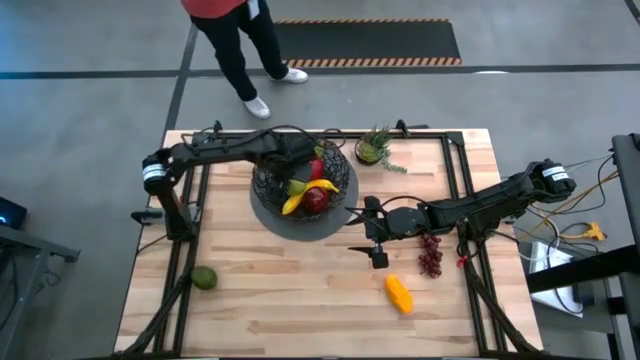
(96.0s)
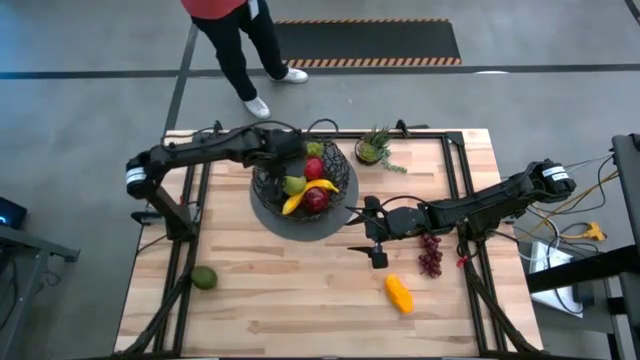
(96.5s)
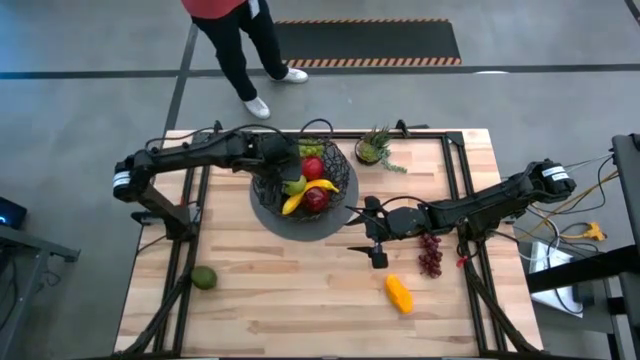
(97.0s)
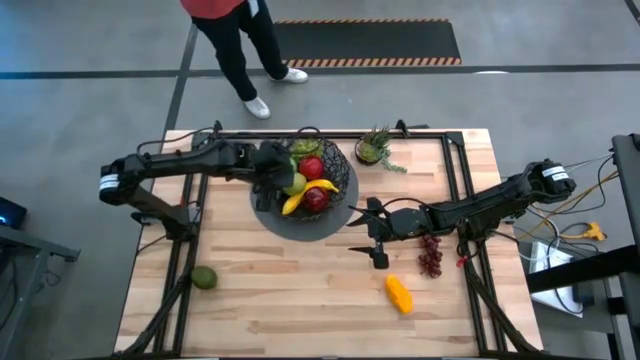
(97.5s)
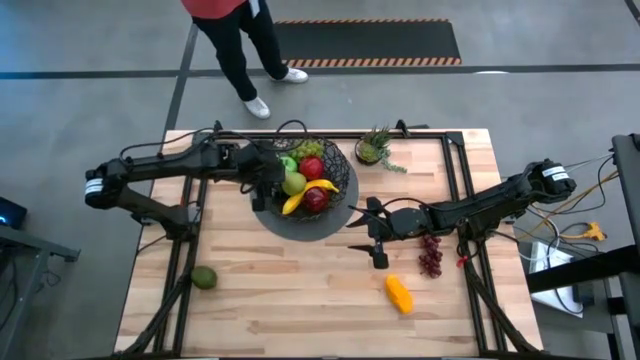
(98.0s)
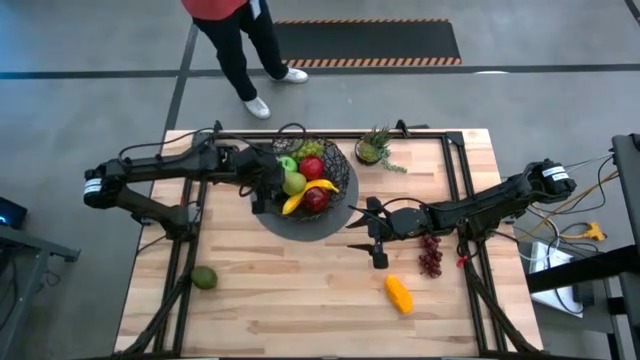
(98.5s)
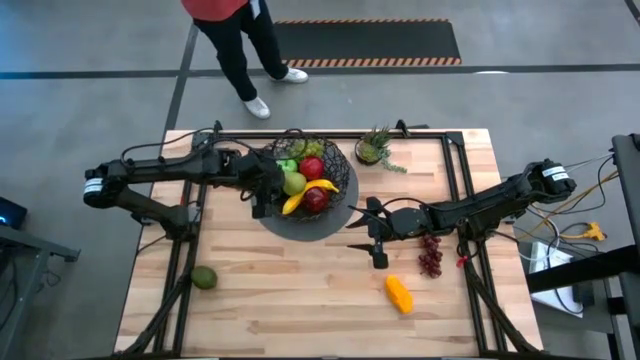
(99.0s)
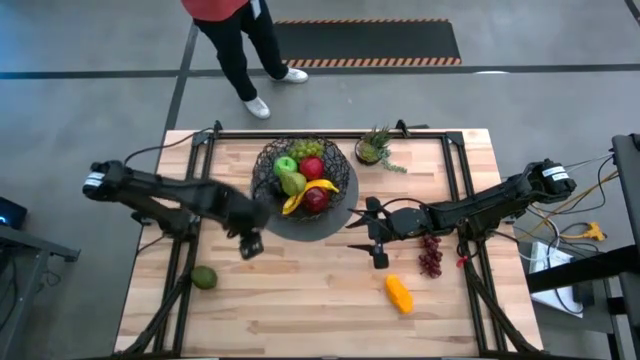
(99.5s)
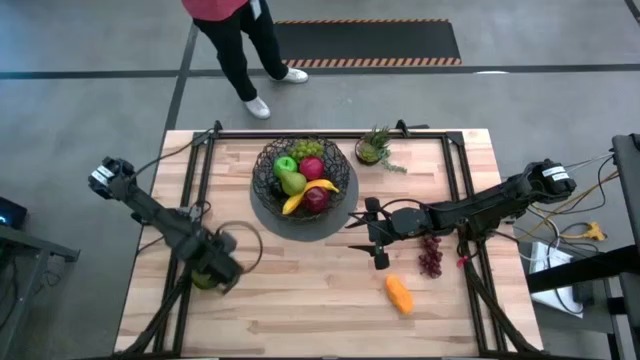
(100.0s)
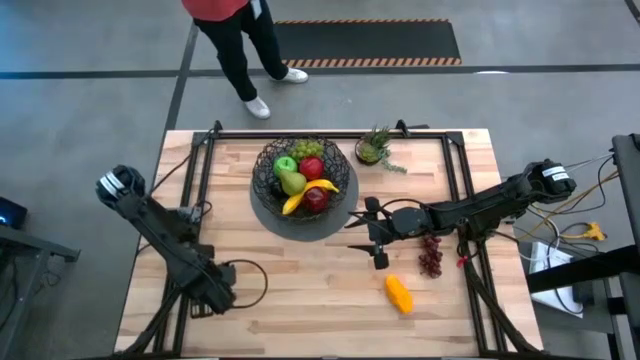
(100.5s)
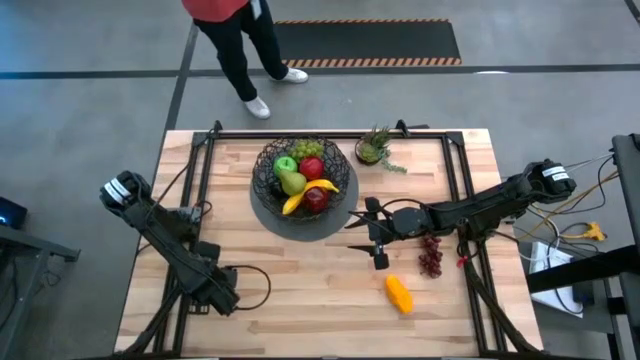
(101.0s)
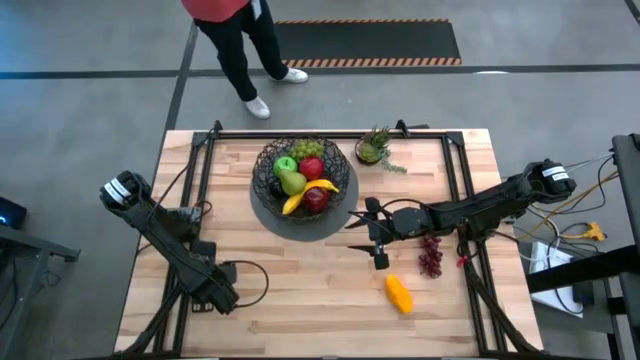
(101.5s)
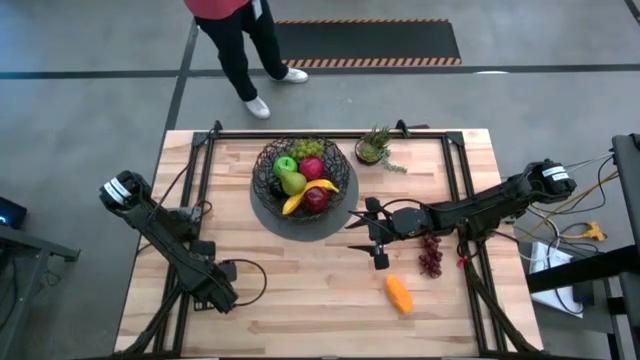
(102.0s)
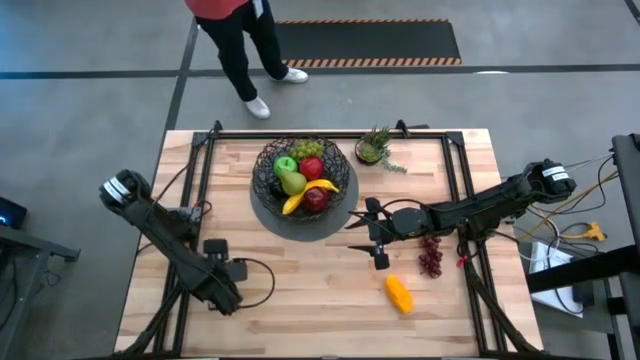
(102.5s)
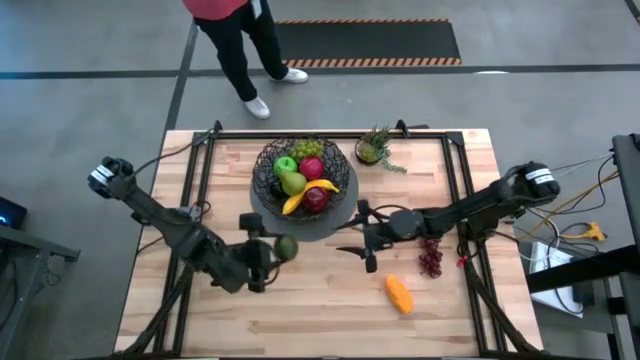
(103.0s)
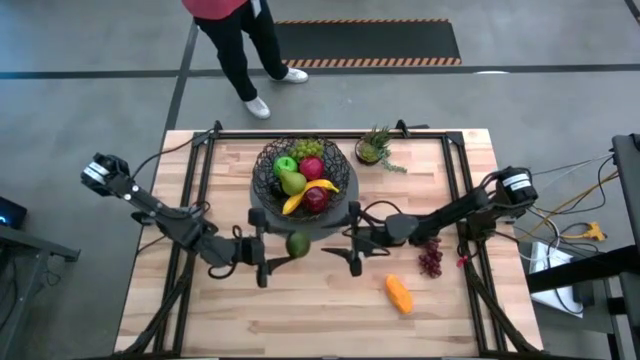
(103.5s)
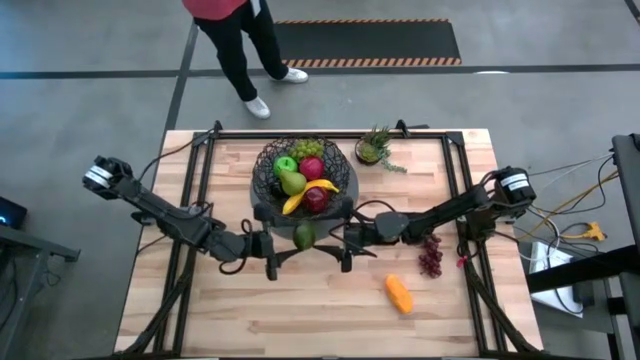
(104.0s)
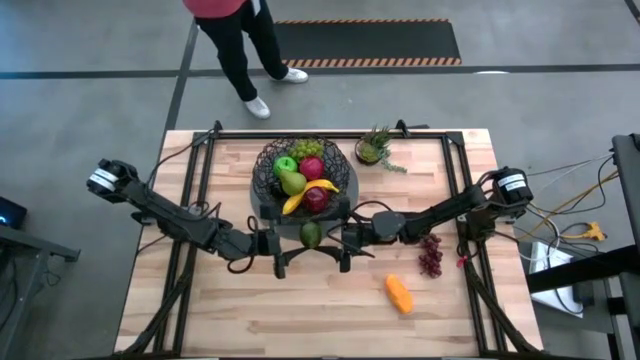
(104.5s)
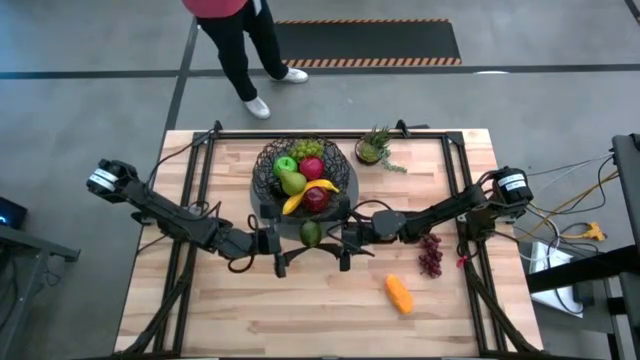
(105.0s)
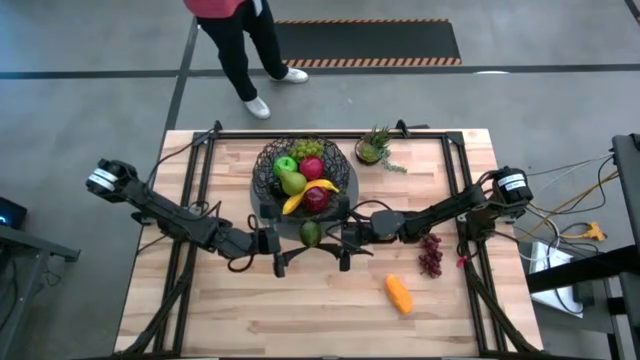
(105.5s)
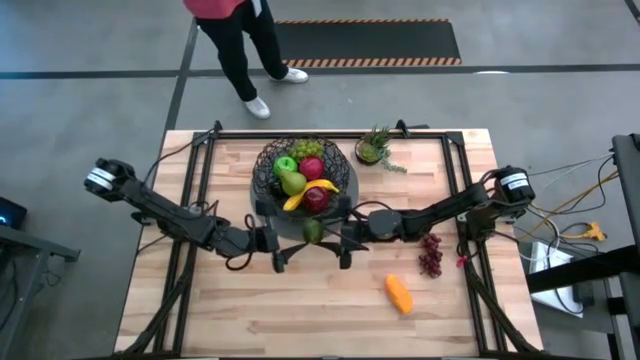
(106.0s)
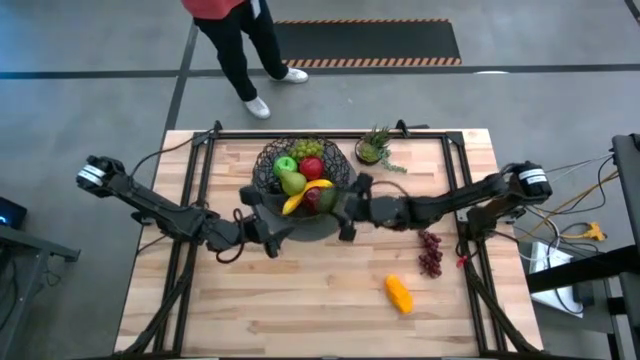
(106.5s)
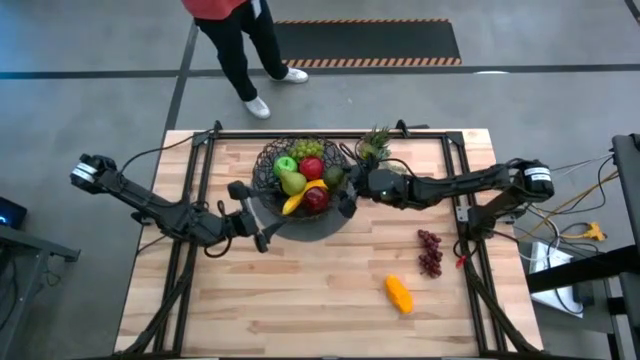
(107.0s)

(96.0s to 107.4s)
Task: Build produce basket
Put the lime into the black wire basket

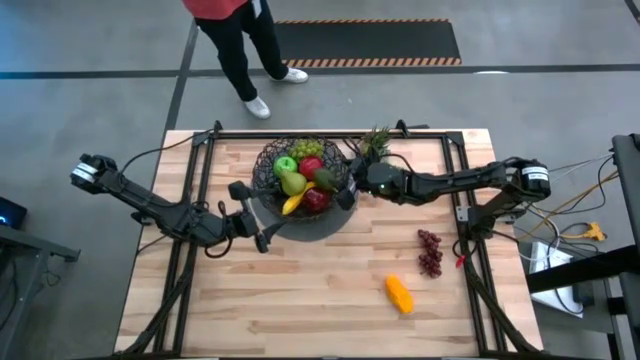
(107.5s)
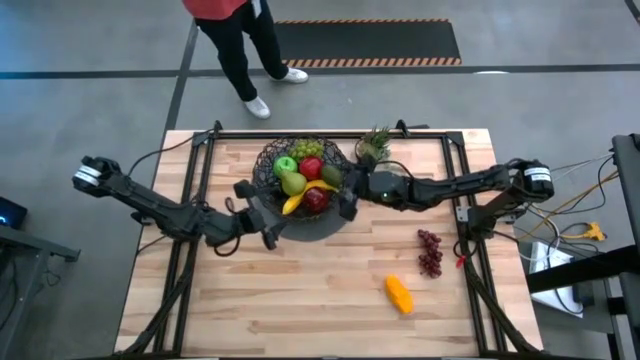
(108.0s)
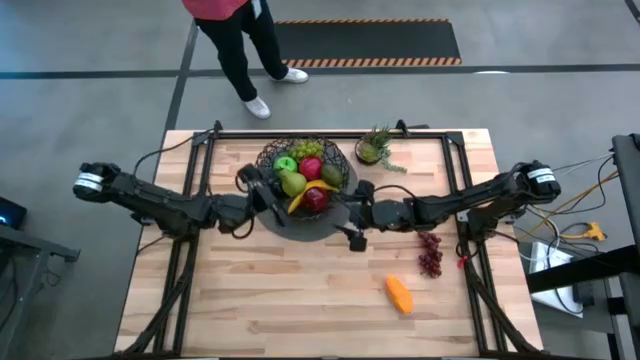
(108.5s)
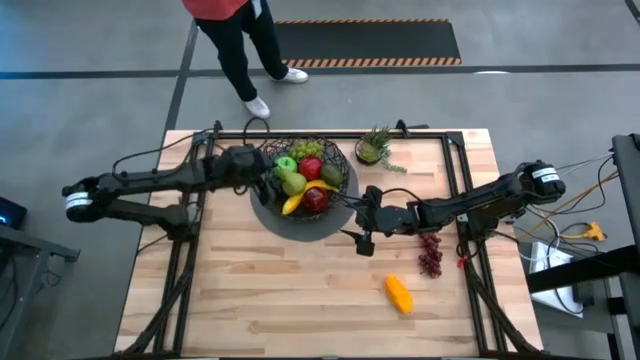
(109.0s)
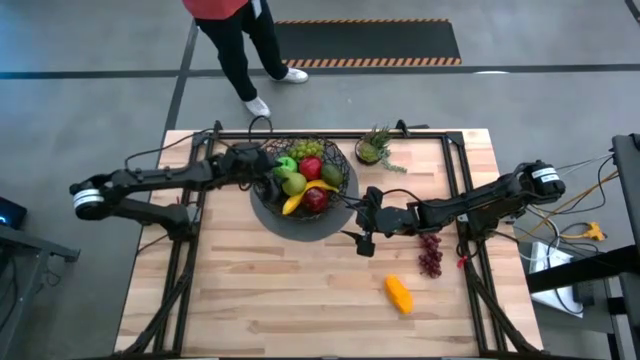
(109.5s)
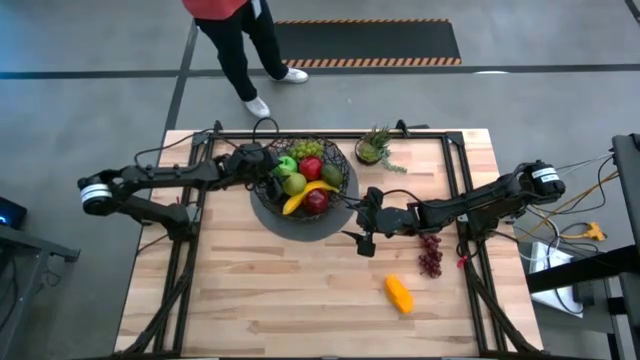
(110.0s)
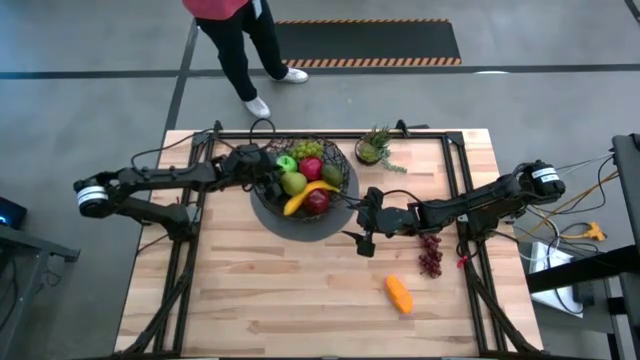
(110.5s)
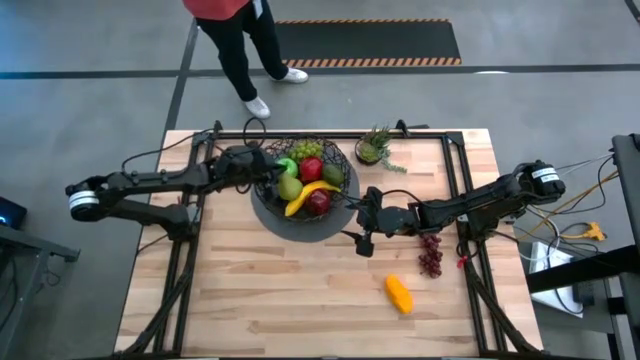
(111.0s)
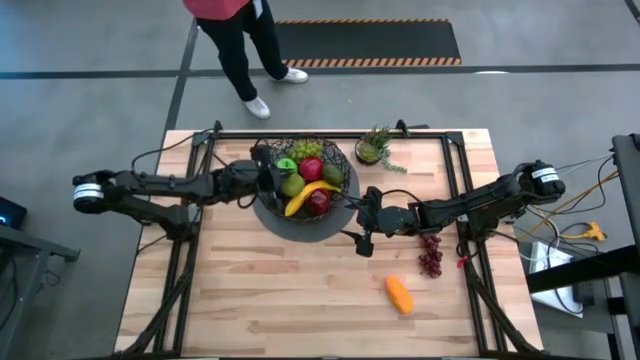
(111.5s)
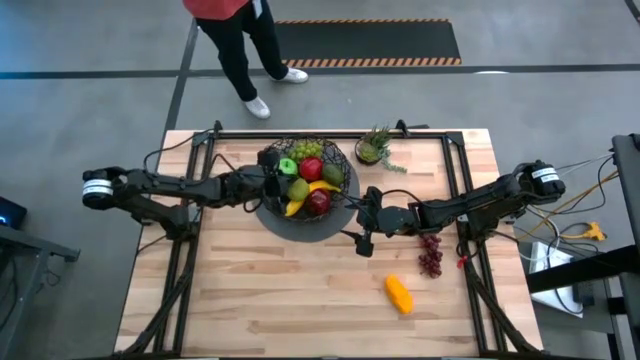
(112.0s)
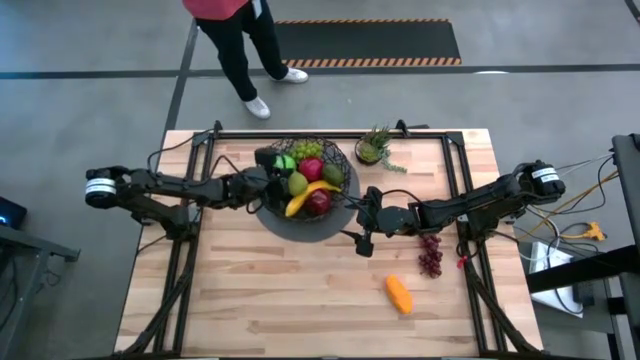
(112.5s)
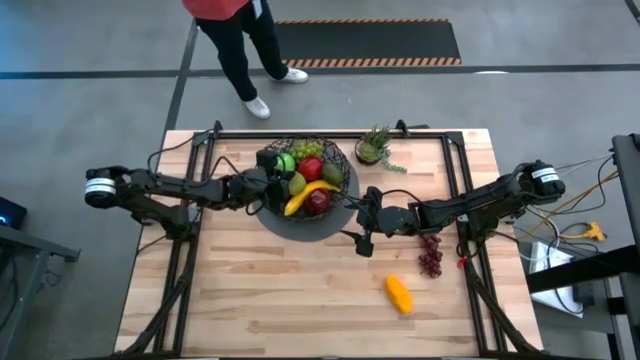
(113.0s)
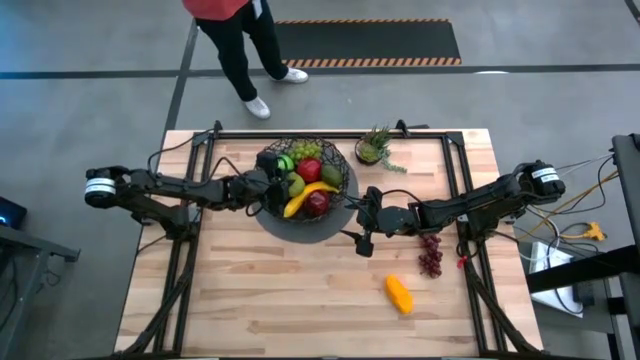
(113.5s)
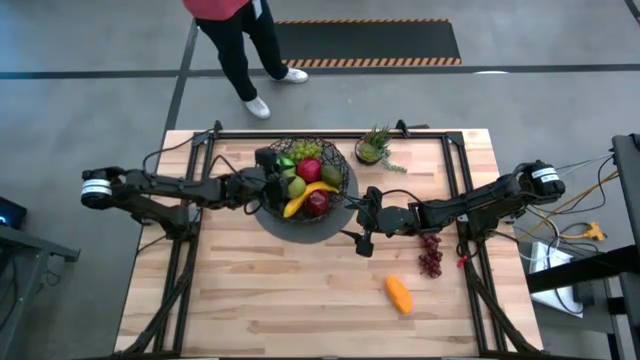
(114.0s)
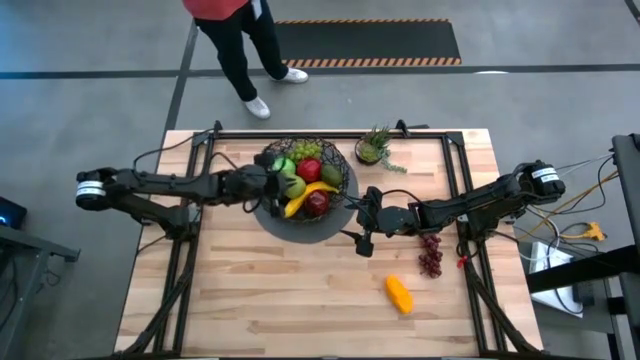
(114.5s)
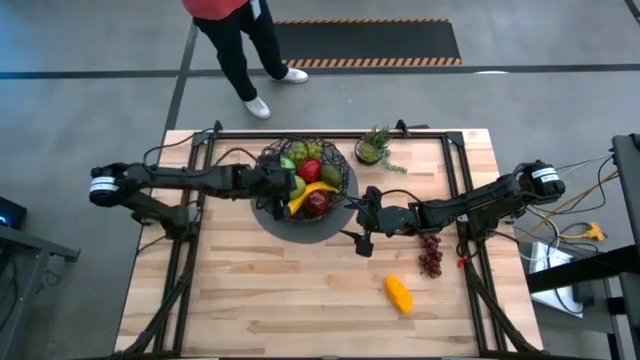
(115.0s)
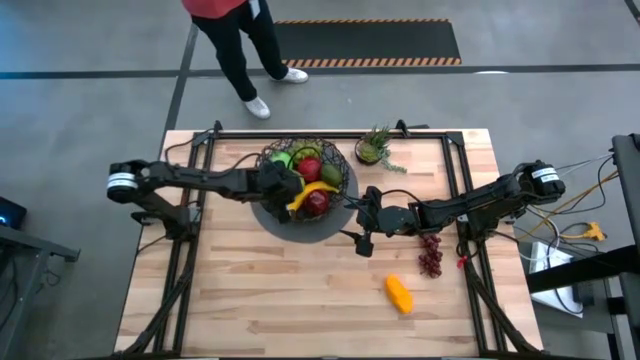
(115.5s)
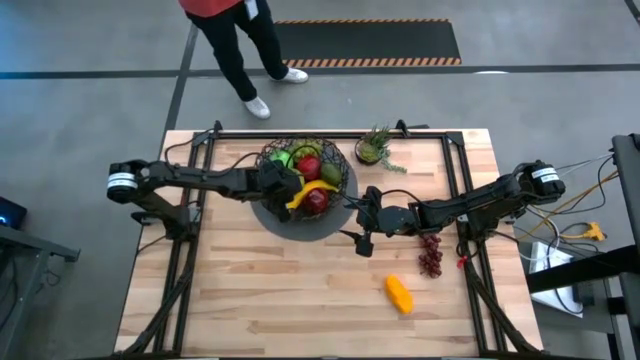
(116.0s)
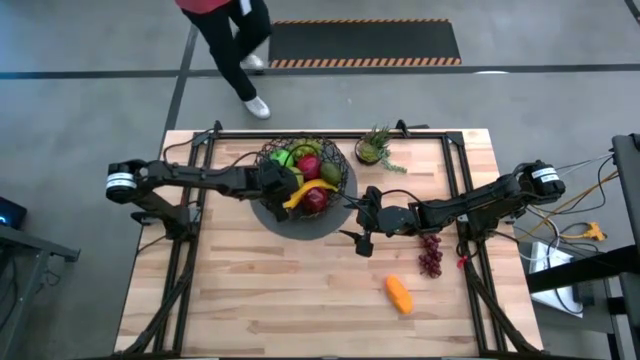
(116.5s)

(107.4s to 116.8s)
Adjust the pear in the black wire basket

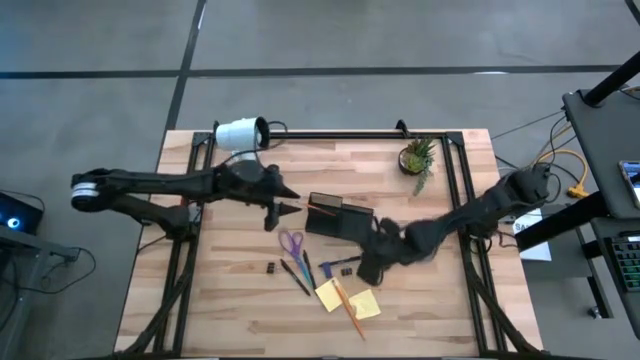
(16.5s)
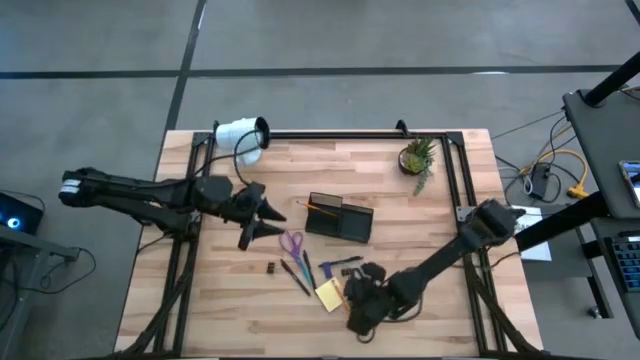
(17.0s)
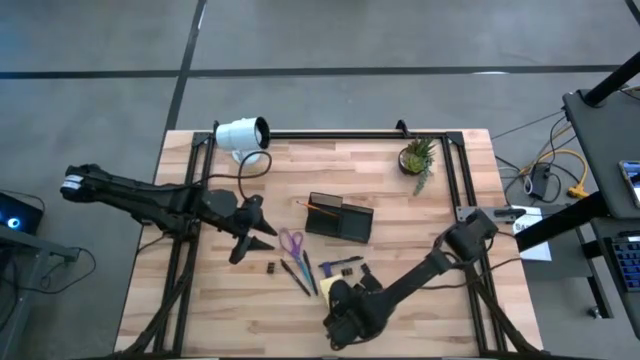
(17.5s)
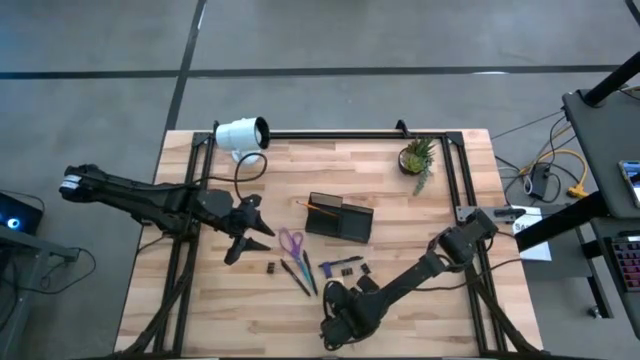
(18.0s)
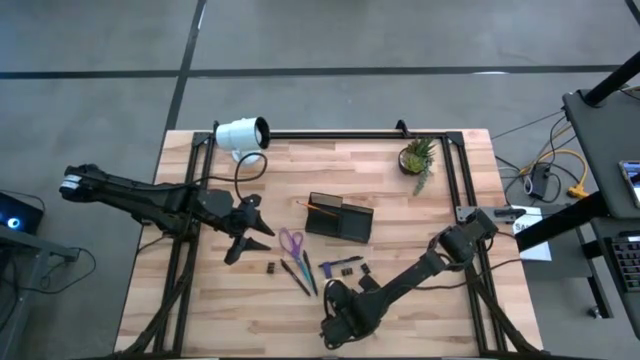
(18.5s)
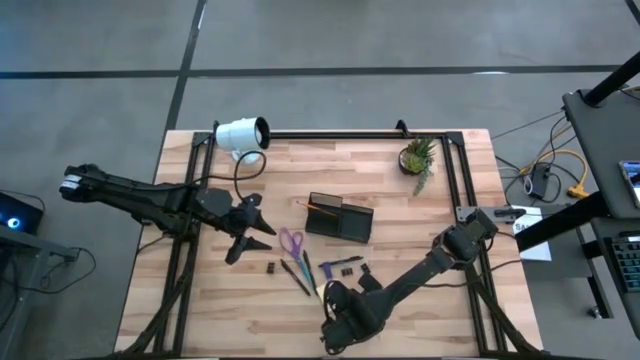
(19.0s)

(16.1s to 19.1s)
Task: Pick and place office supplies into organizer
Put the orange pencil into the black desk organizer
